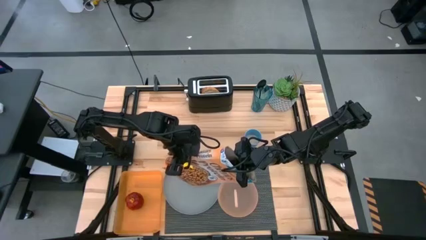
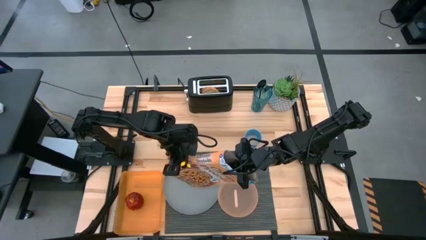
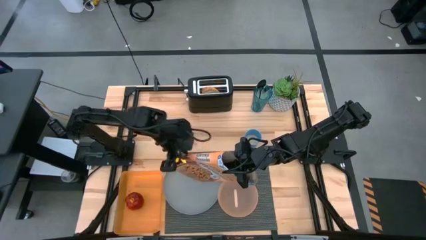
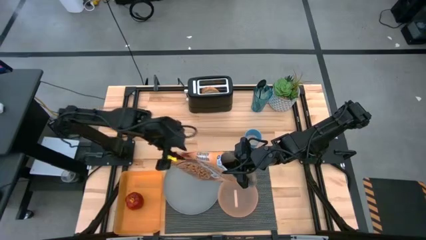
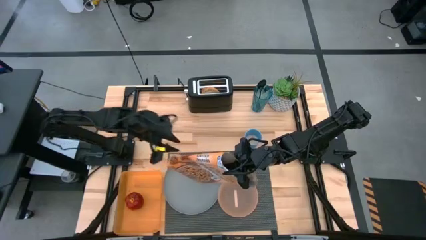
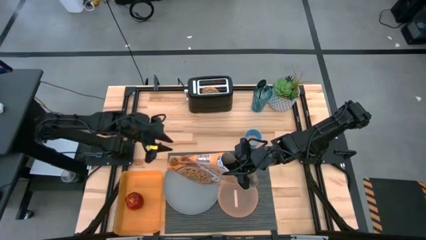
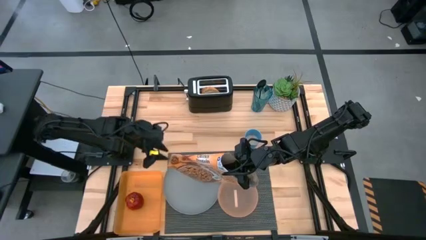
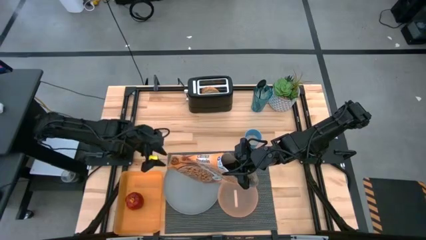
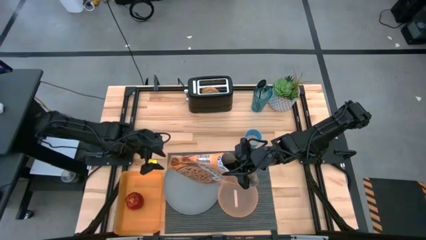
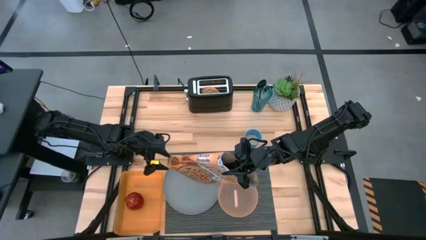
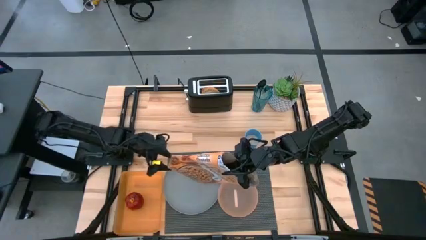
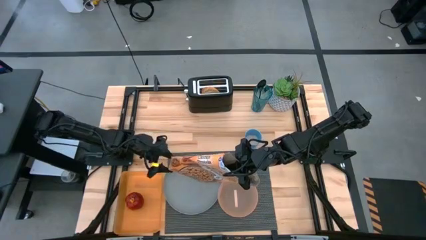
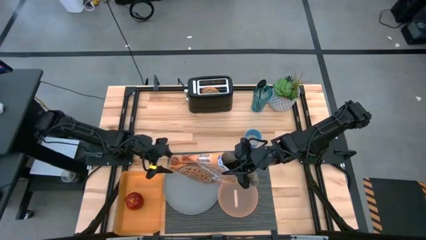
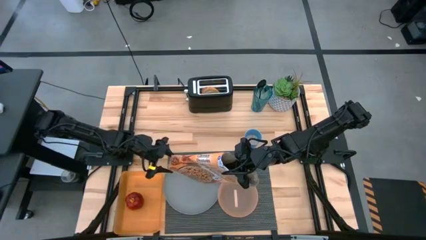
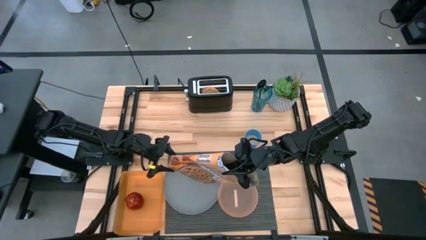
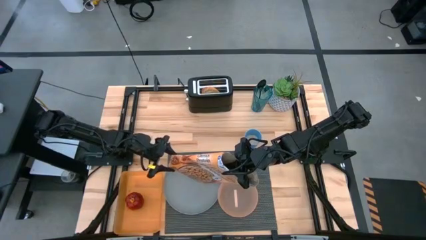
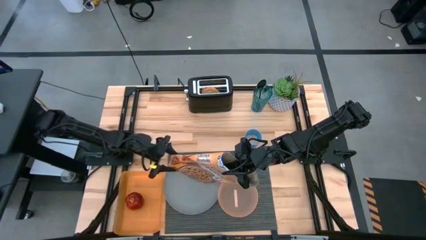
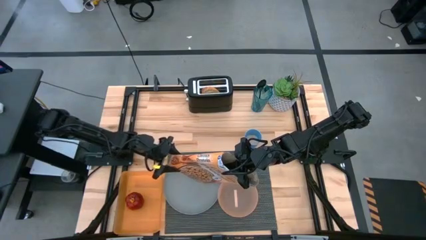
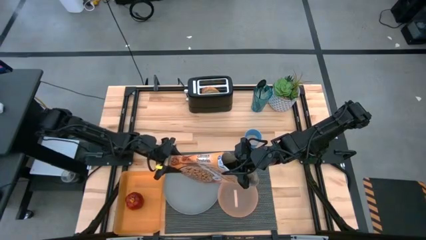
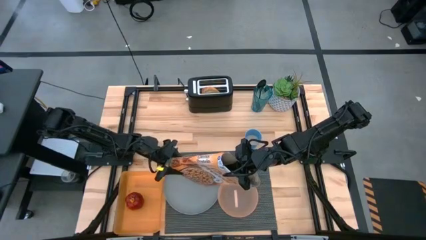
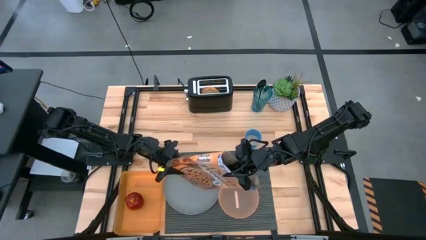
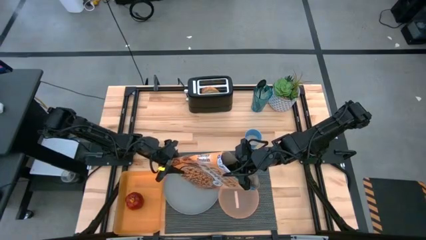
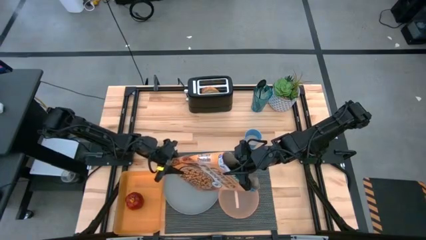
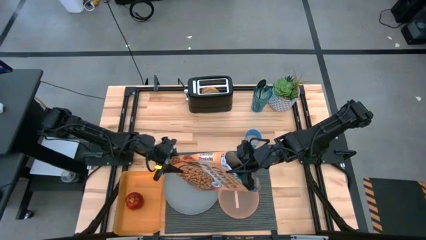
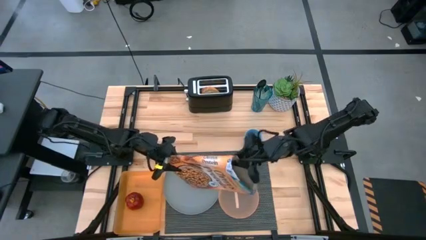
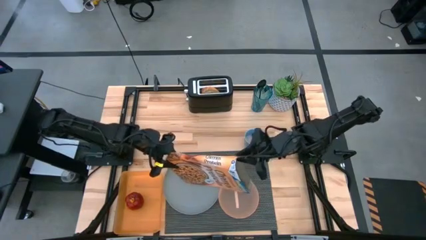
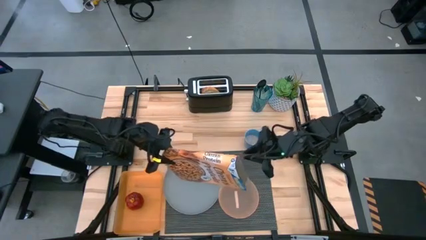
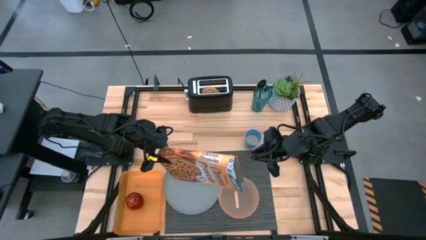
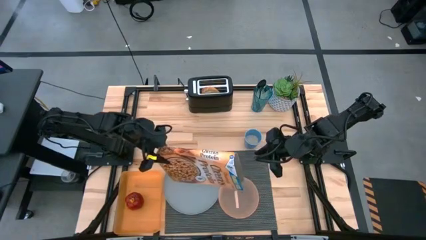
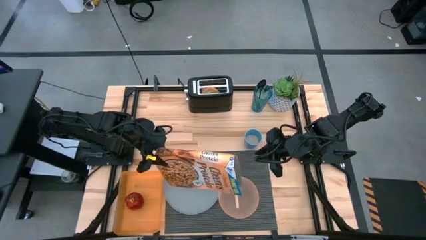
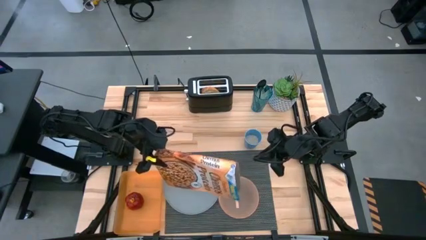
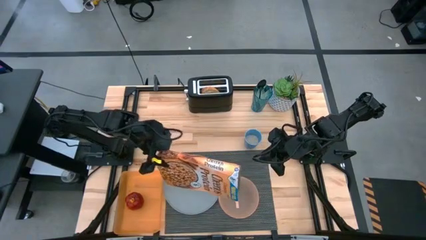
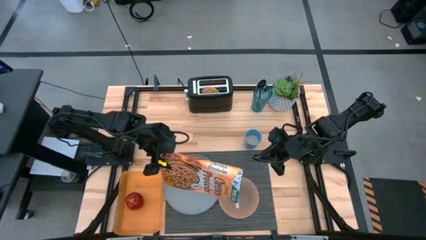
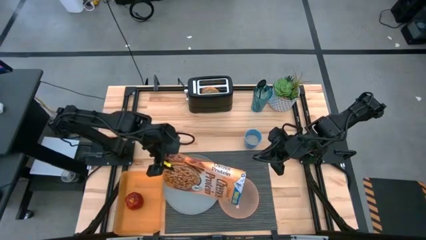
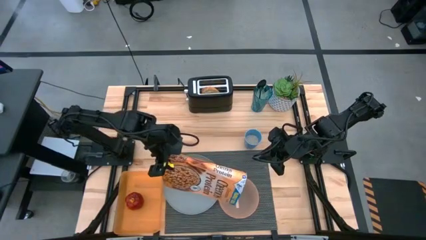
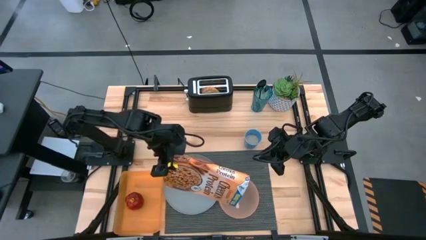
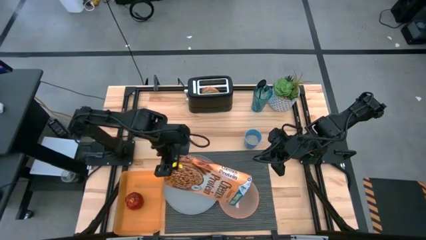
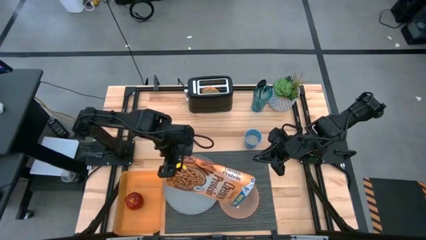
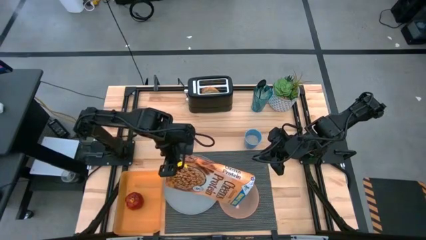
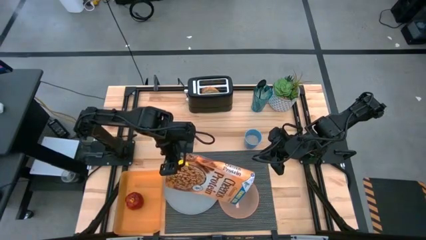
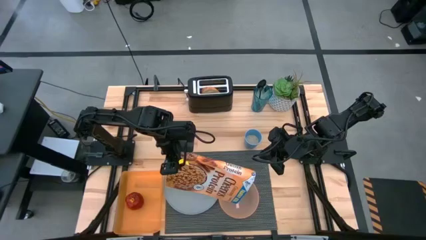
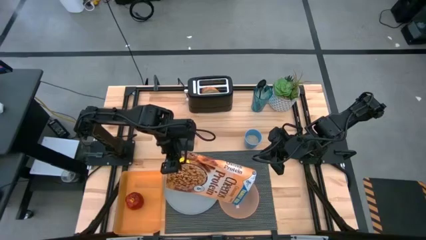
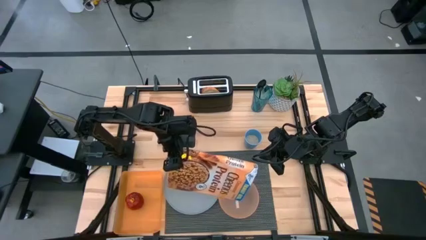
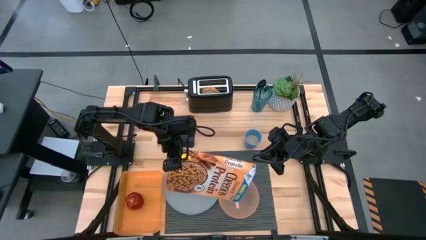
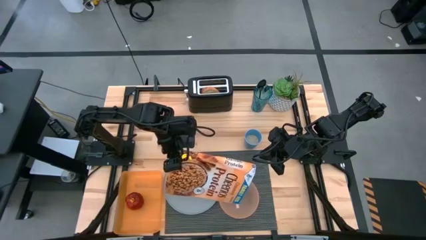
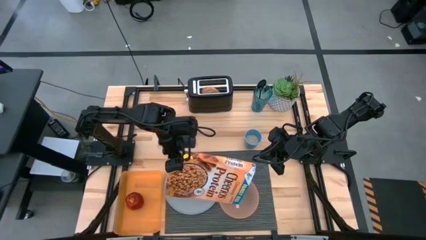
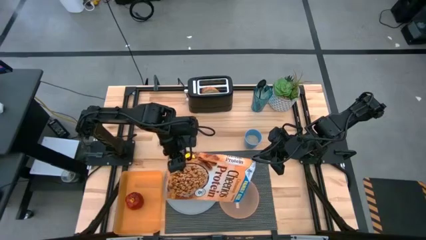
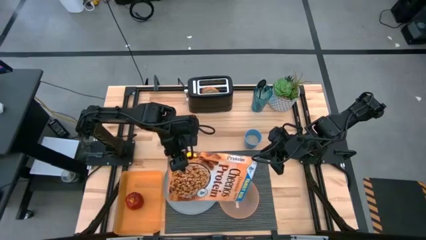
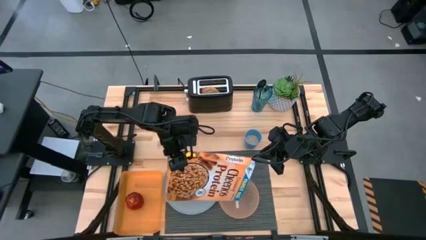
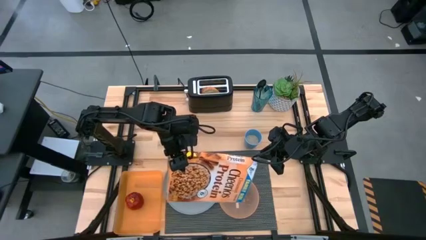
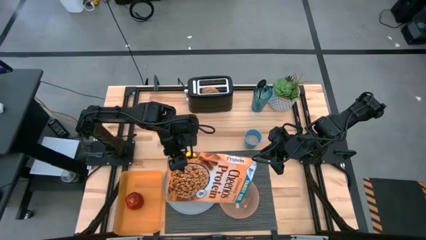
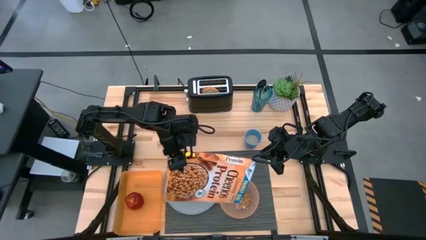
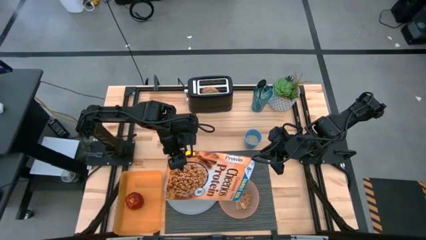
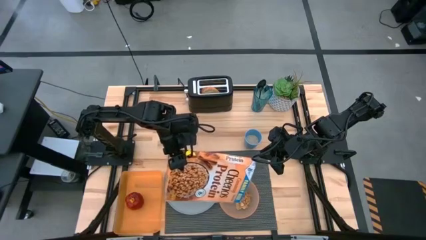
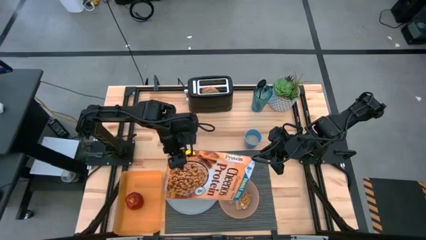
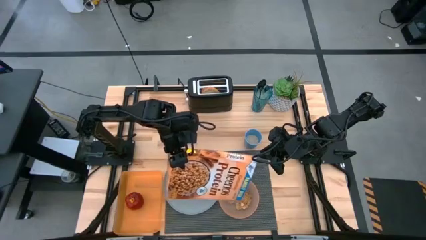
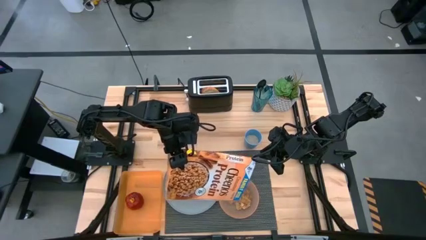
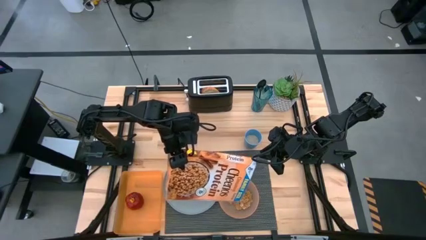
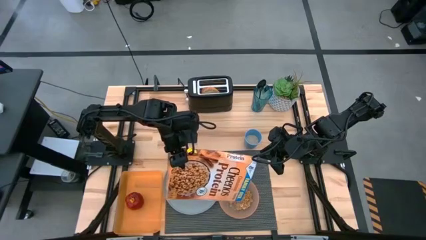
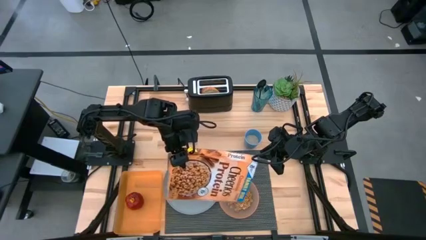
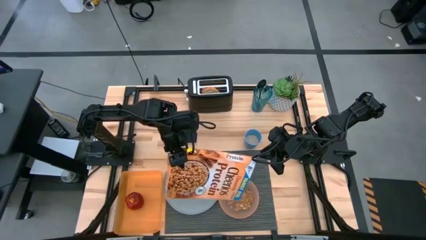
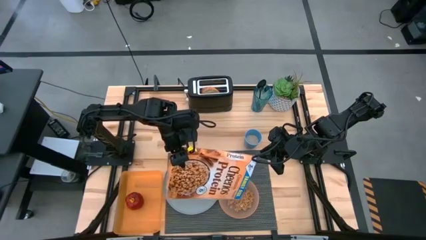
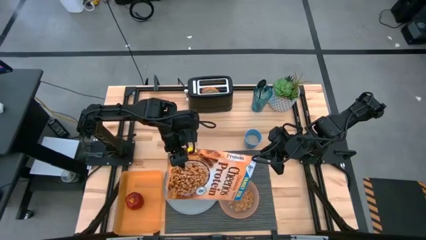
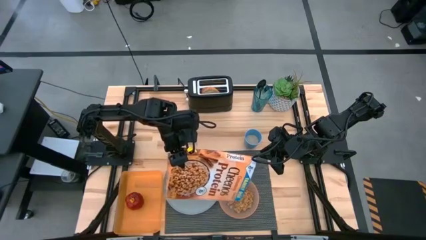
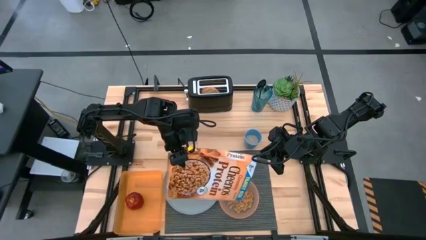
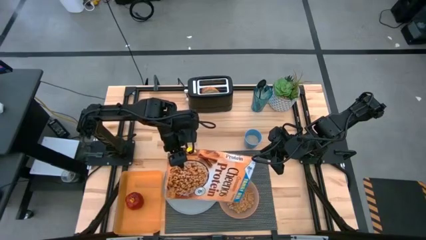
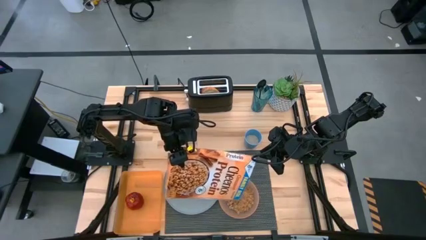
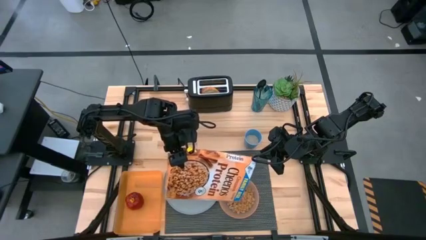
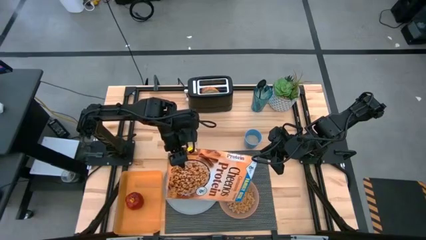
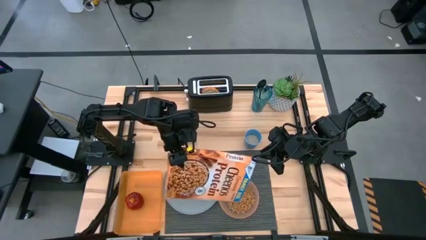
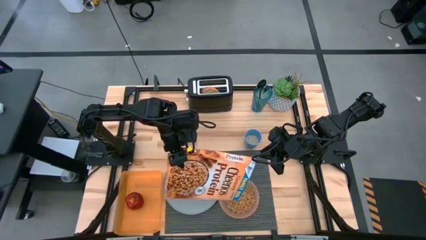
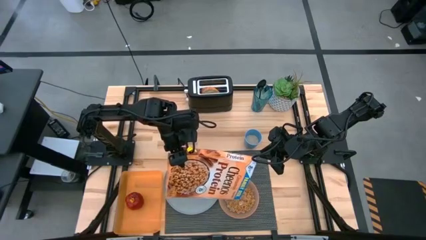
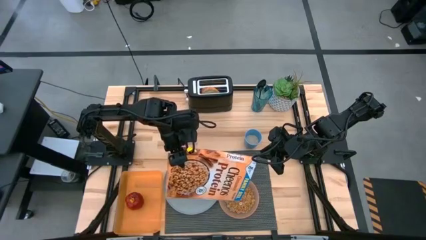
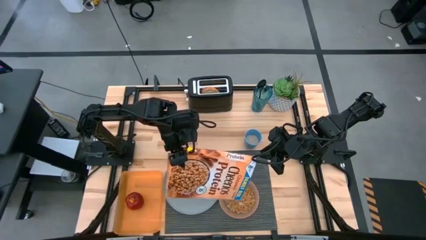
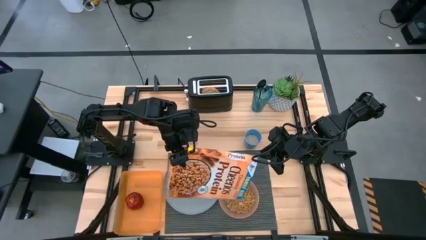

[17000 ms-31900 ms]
Task: Arrange a breakfast setting
Pour the cereal into the orange bowl

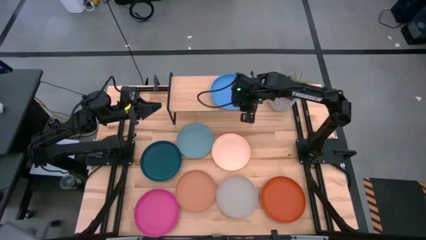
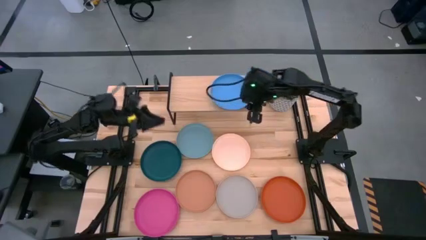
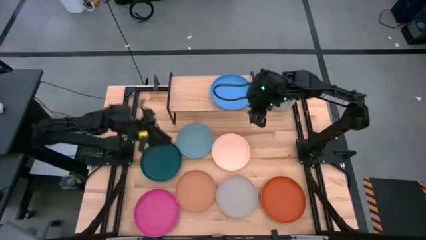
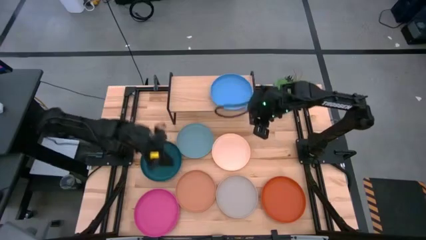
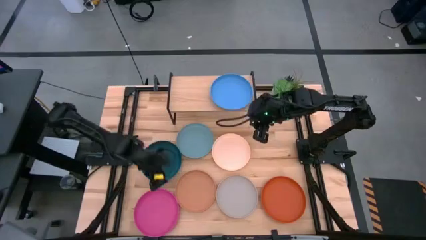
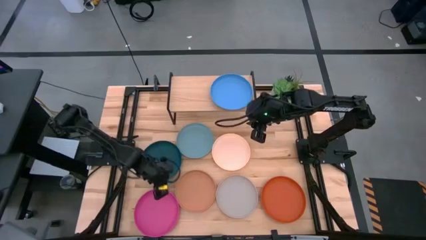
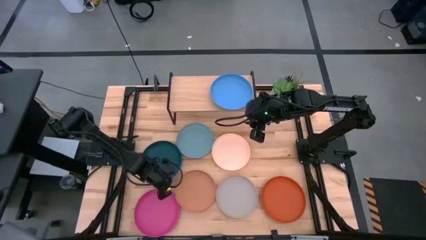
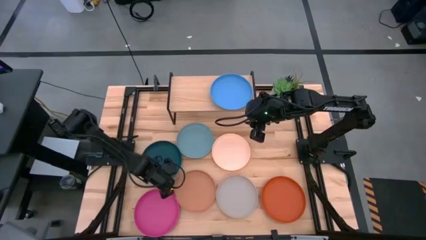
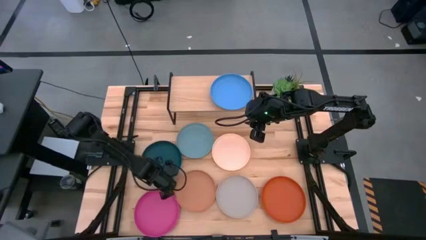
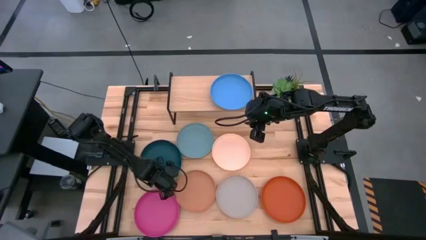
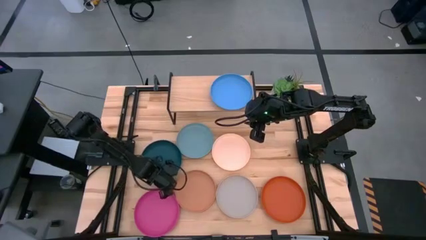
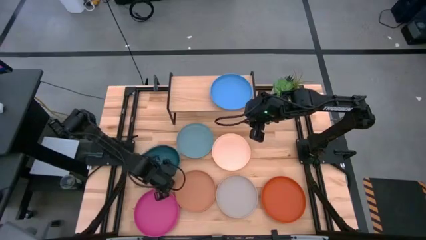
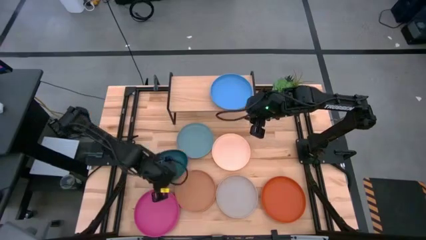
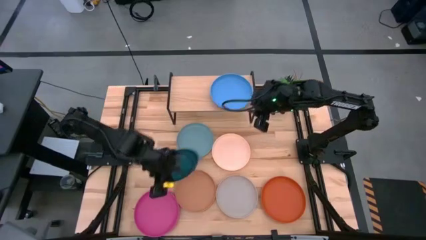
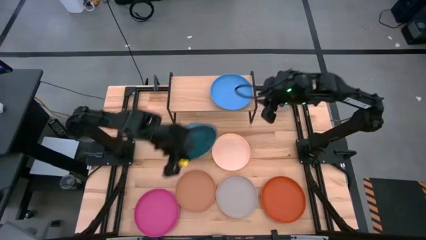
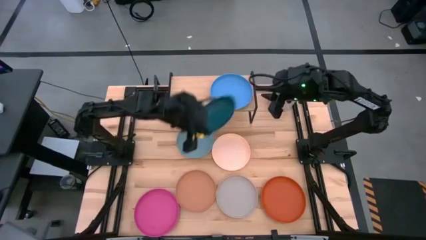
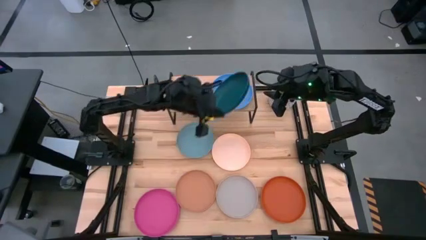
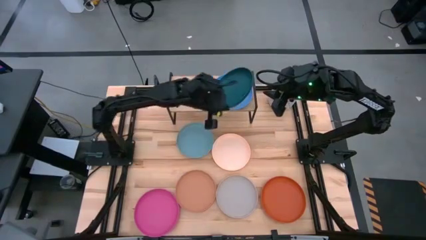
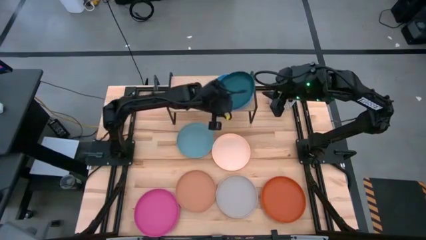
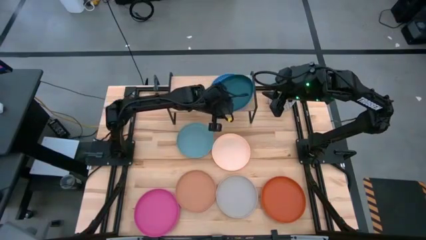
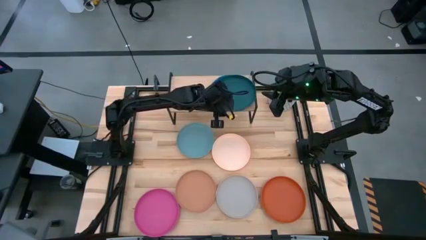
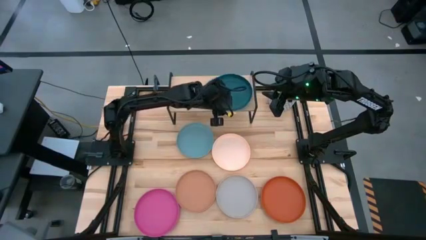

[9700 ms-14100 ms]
Task: Place and stack plates onto a shelf
Stack the dark green plate on top of the blue plate on the shelf
